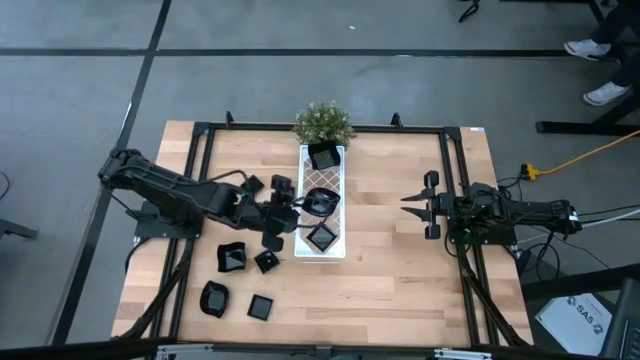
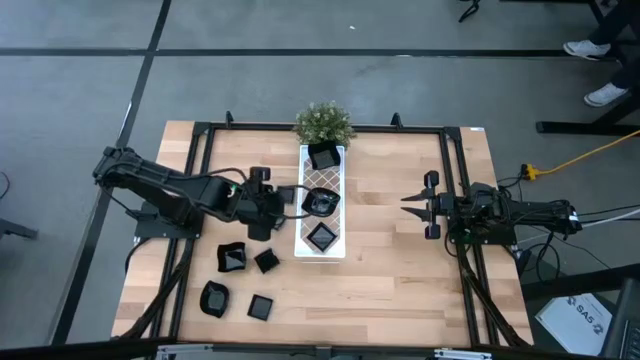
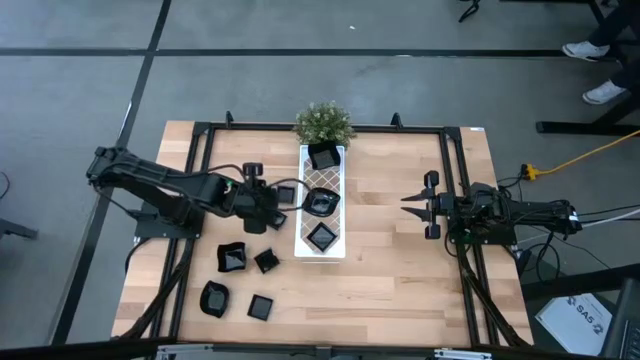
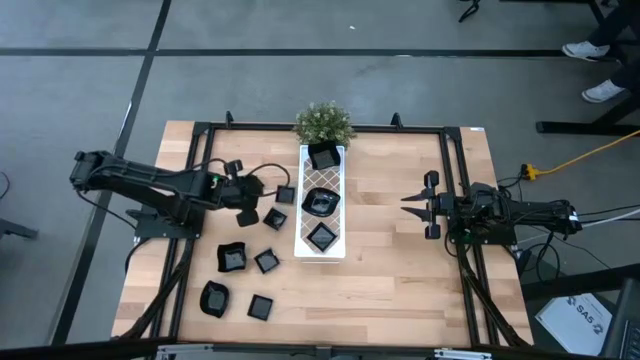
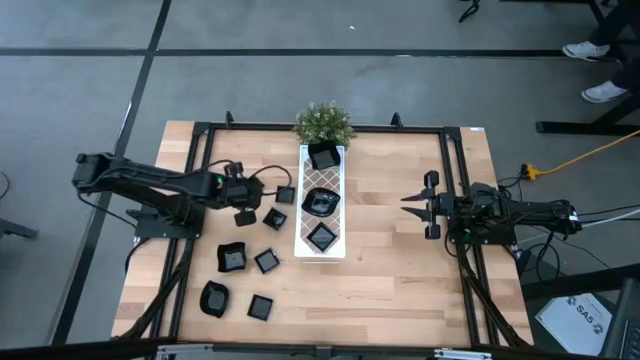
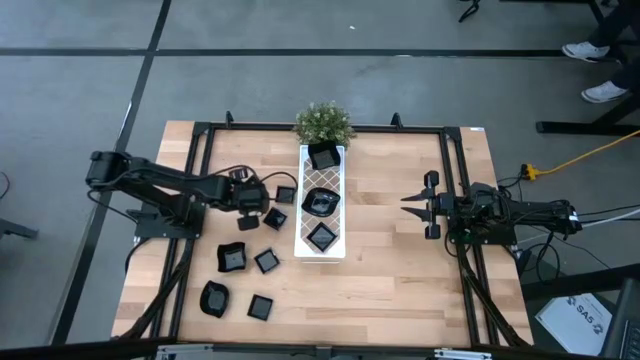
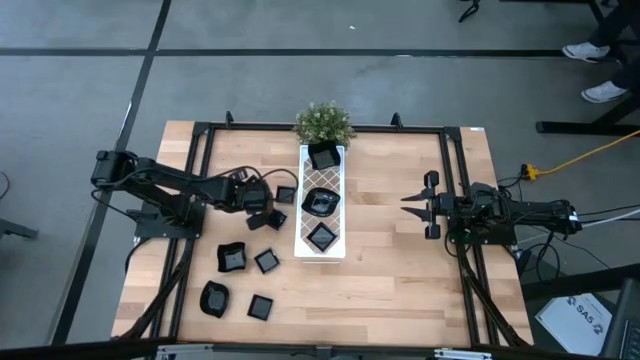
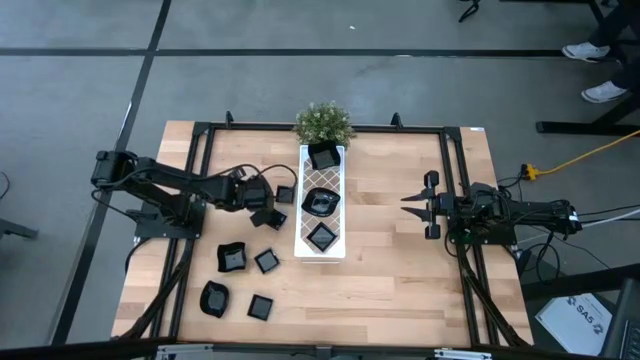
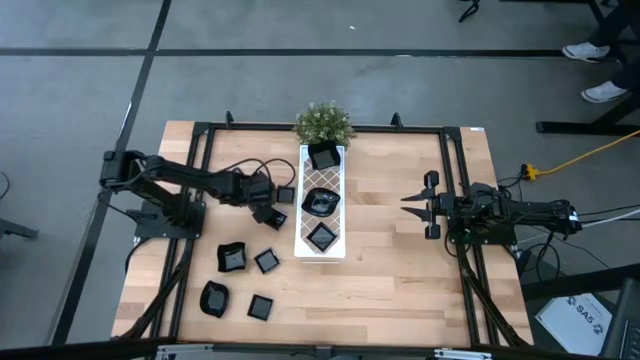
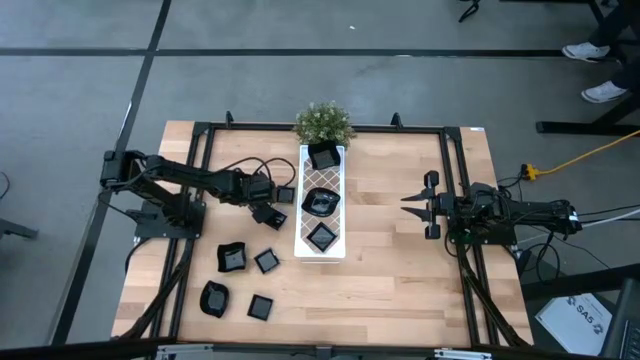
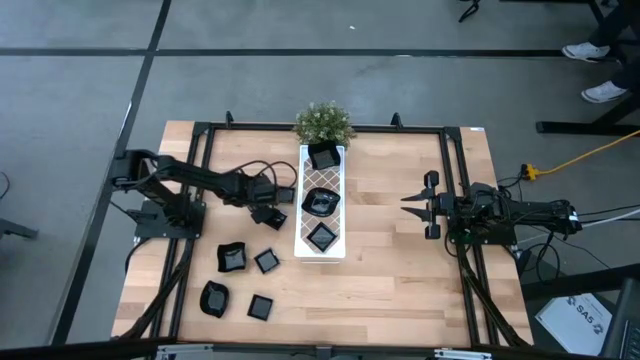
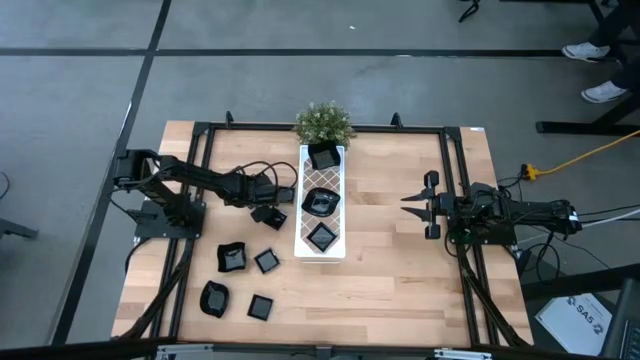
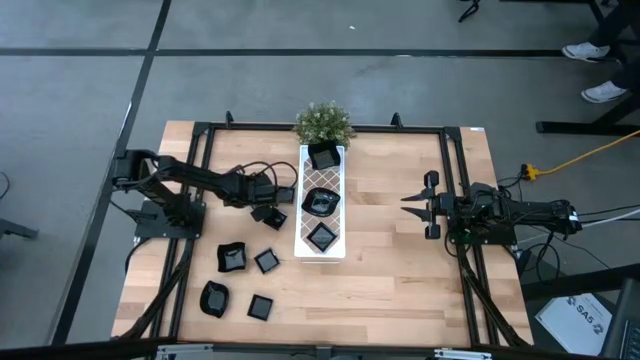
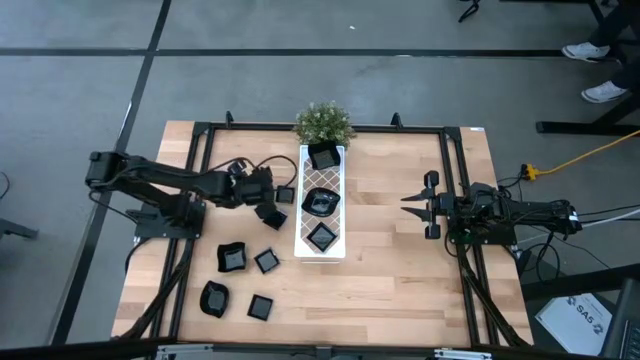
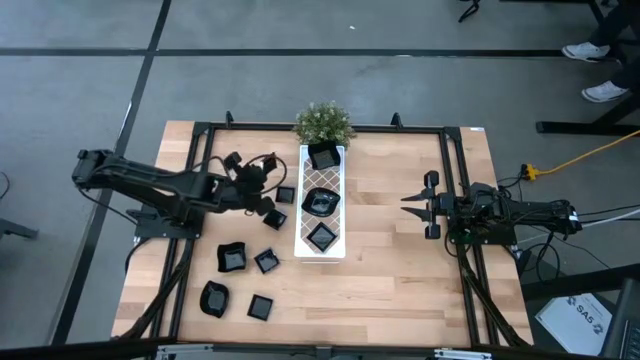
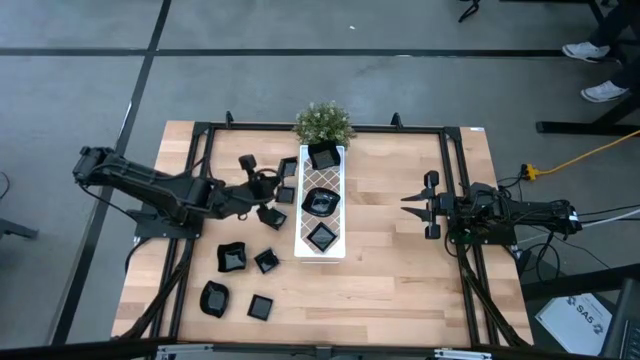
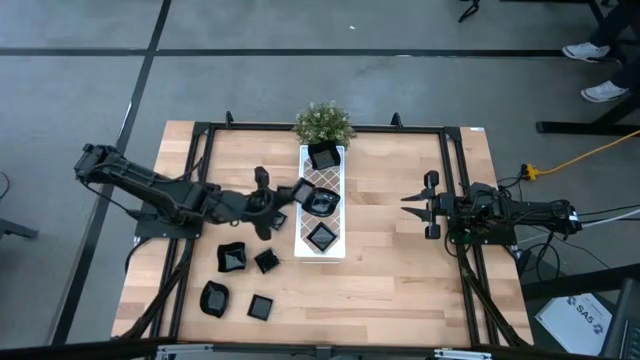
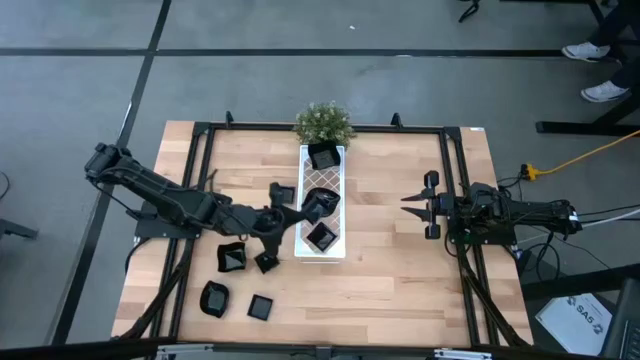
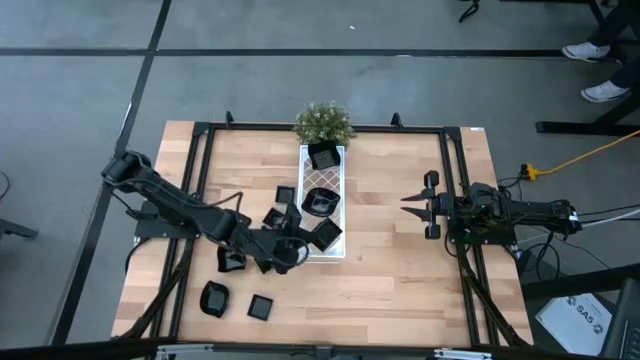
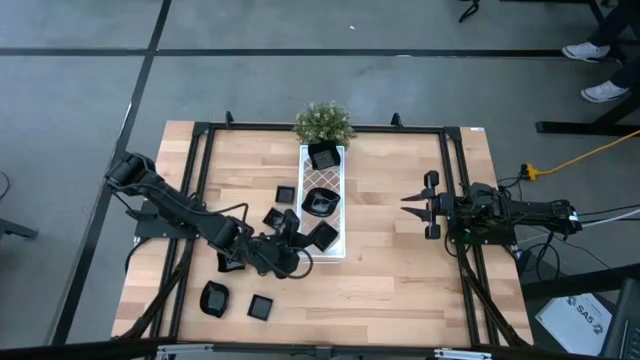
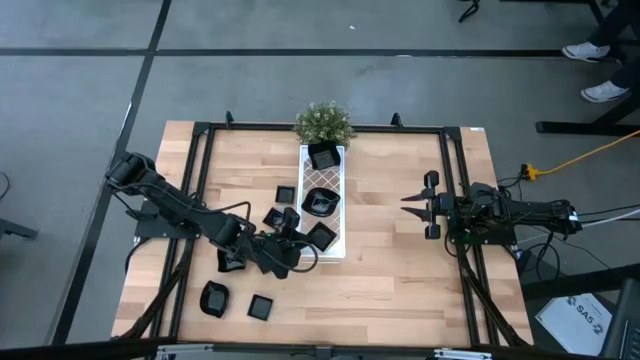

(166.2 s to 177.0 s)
Task: Pick & Place Mini shaped plates
Stack the square plate on top of the square plate on the shelf

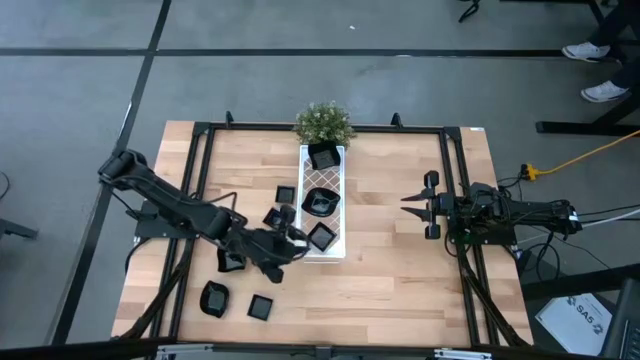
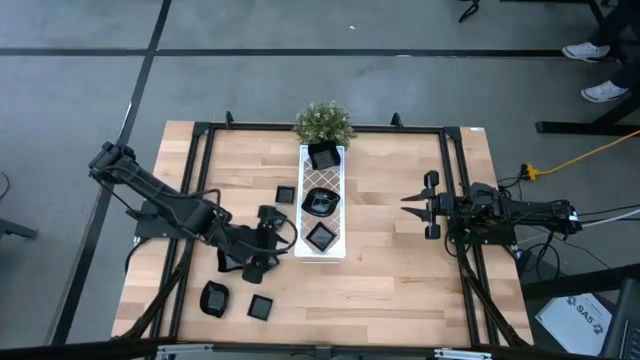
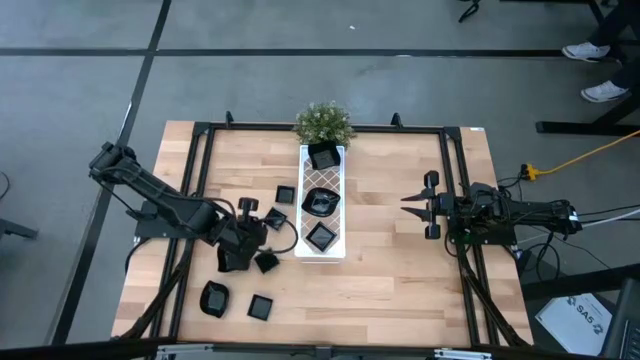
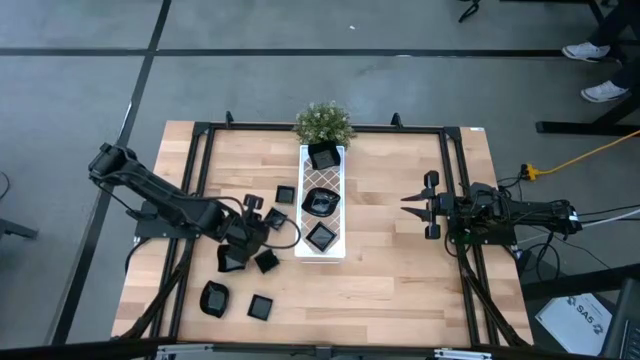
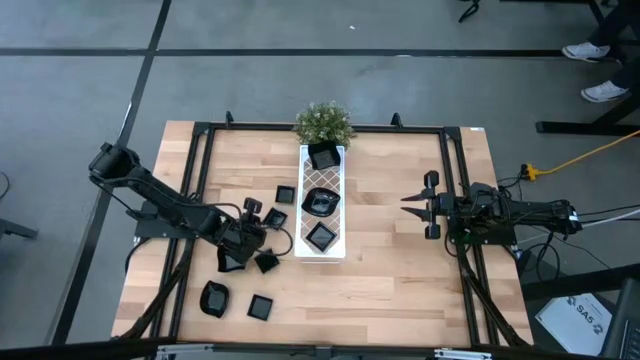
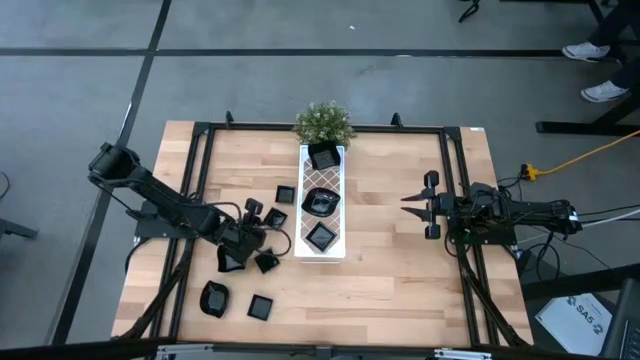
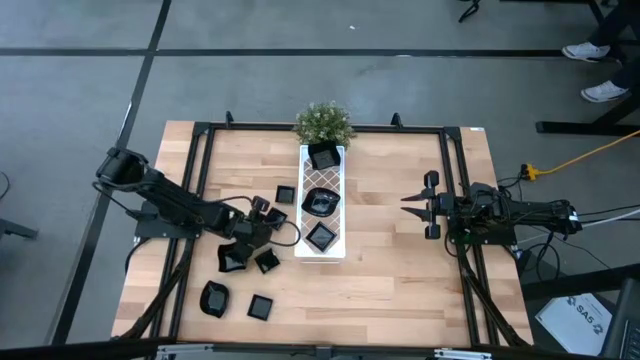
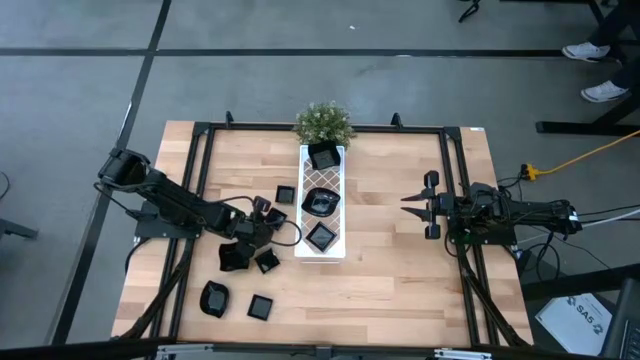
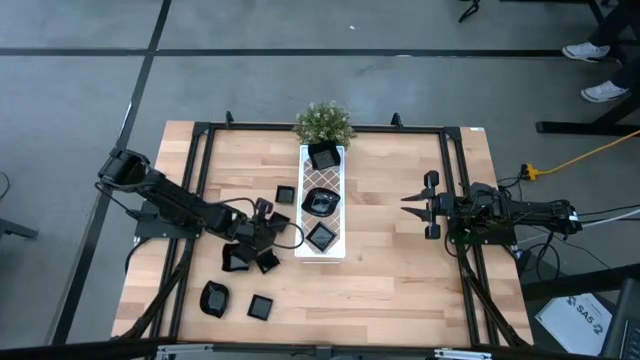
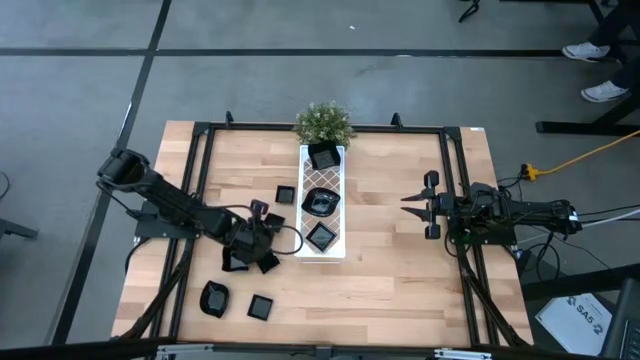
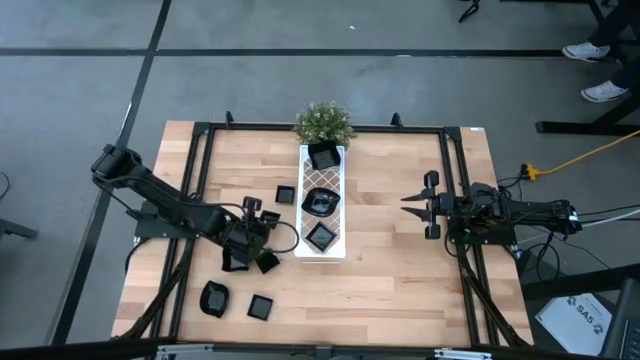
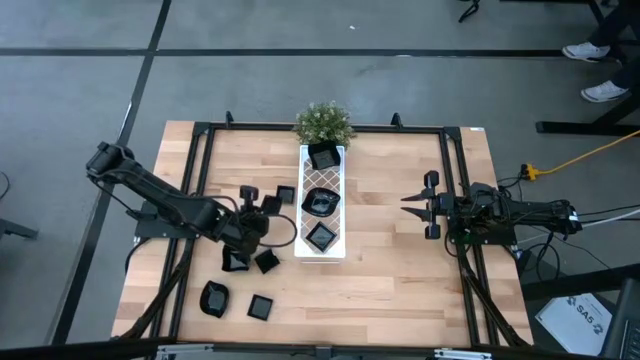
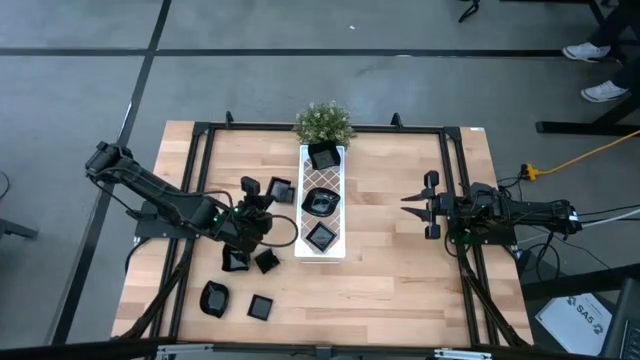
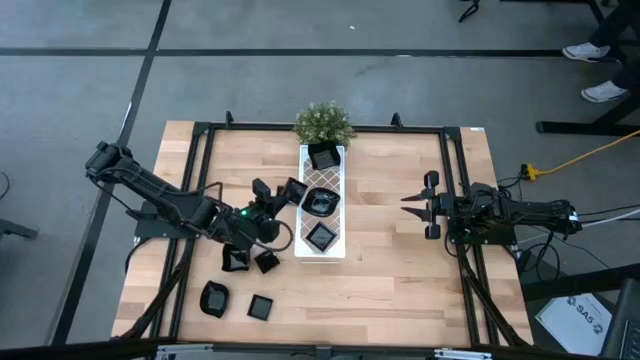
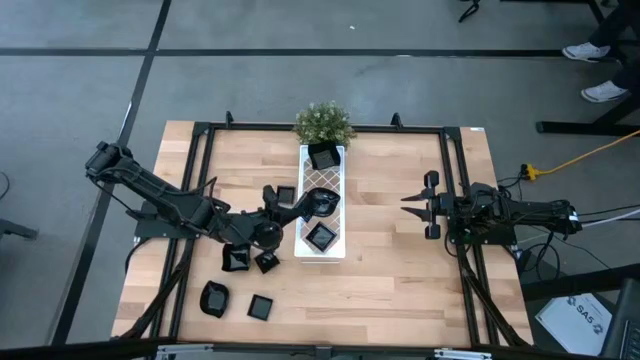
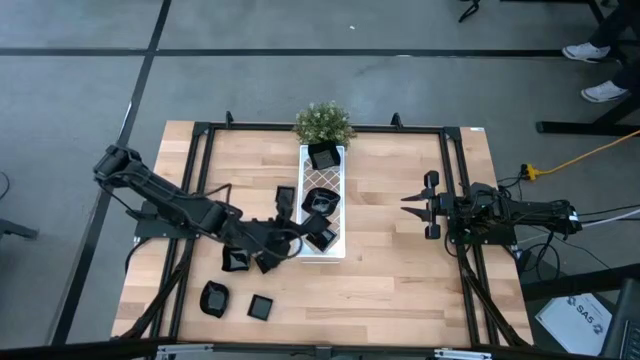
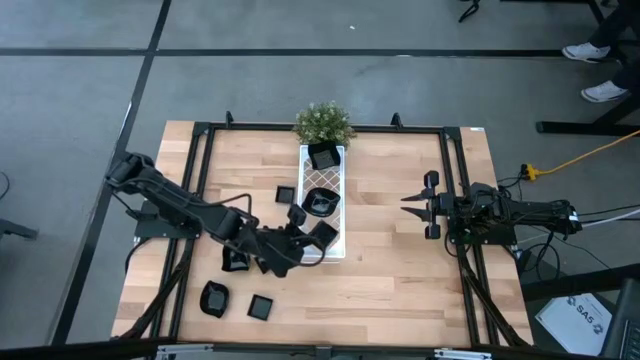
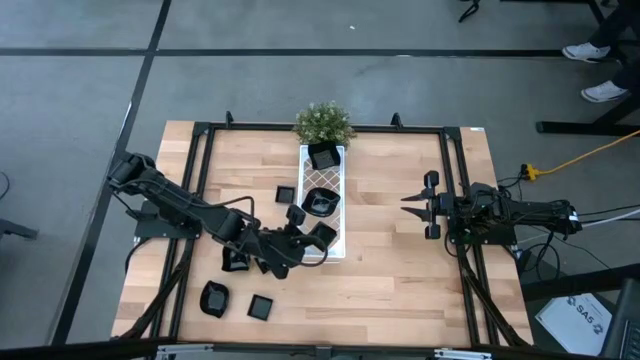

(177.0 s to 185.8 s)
Stack the square plate on top of the square plate on the shelf

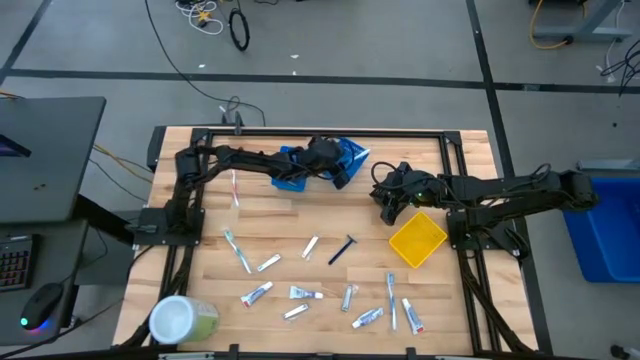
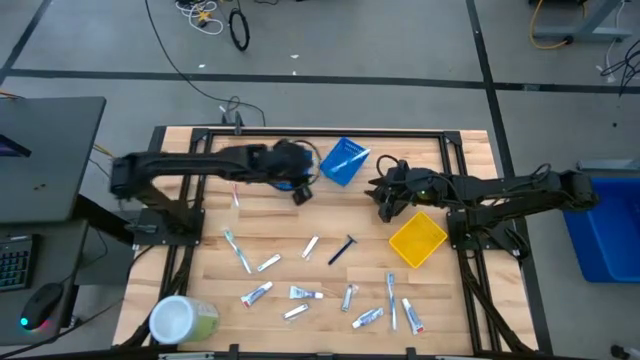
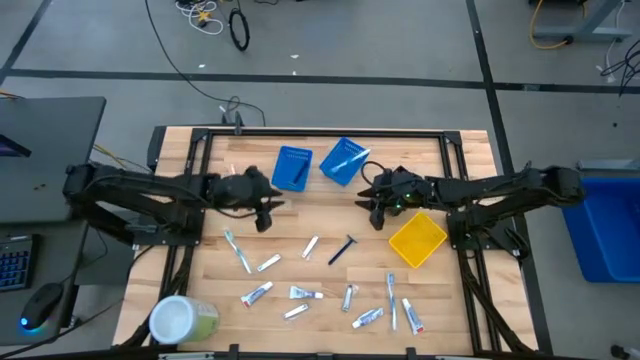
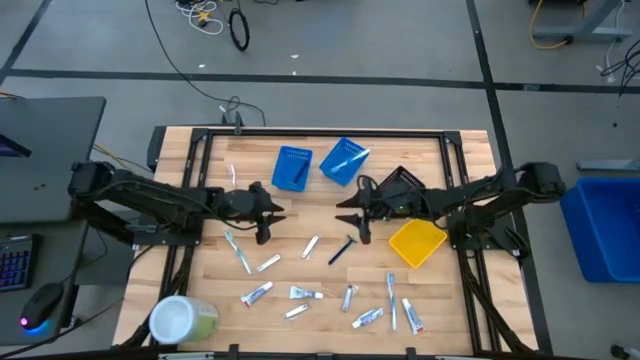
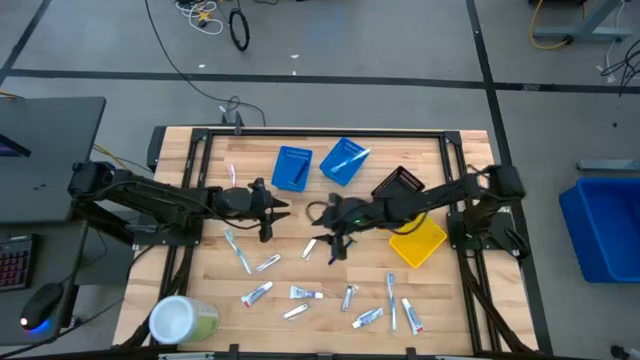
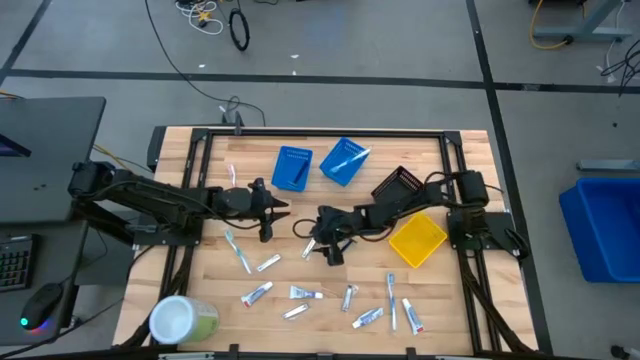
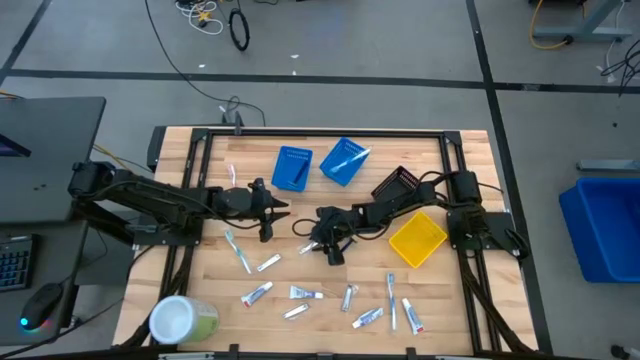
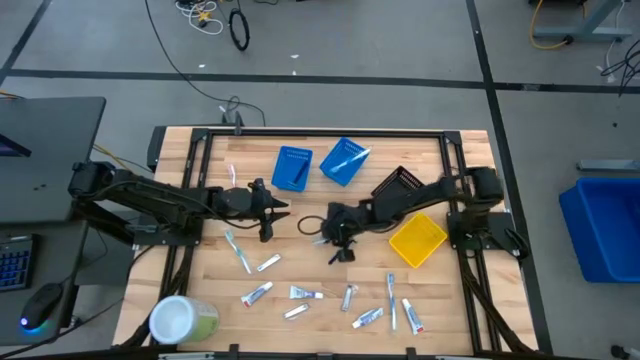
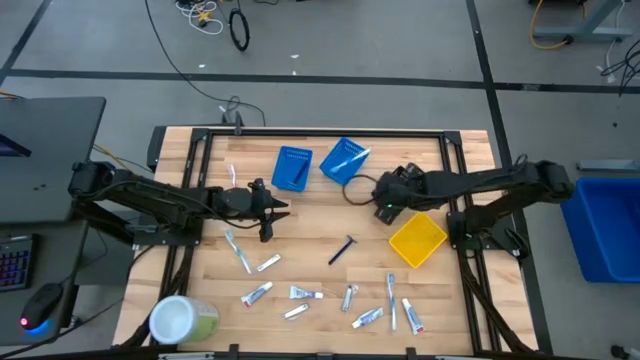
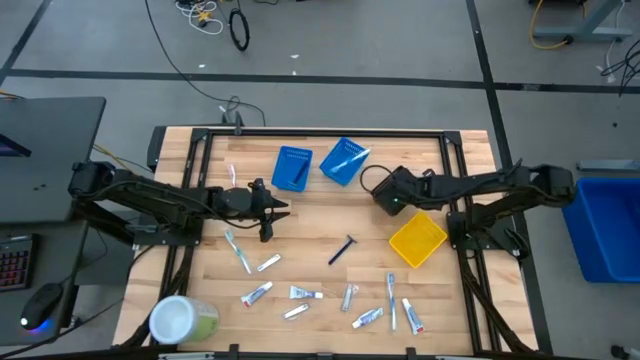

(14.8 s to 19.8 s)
Task: Pick & Place Travel size toiletries
Put the silver nail cutter into the black basket
